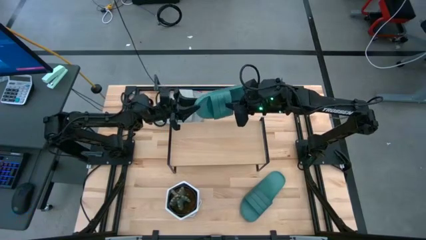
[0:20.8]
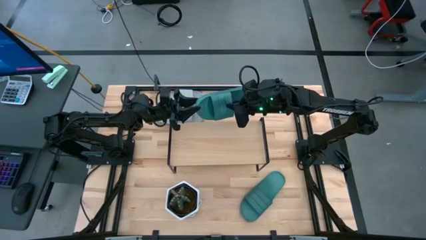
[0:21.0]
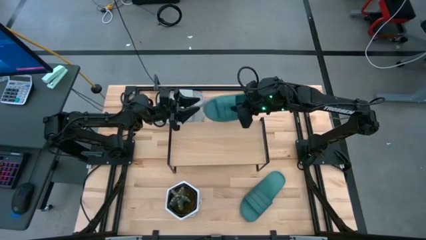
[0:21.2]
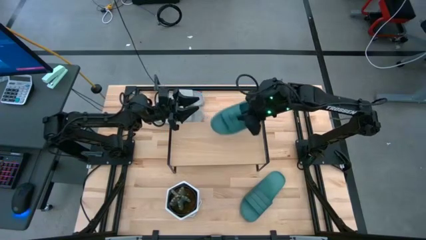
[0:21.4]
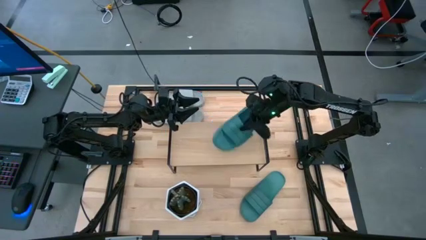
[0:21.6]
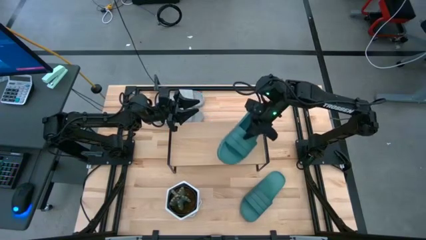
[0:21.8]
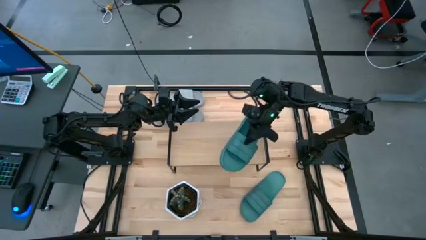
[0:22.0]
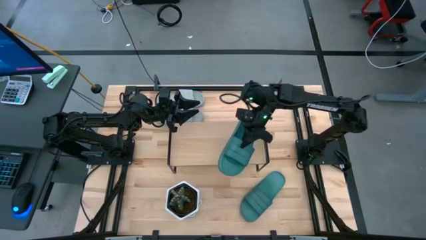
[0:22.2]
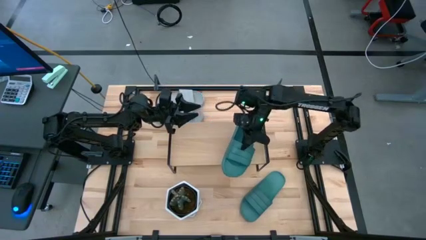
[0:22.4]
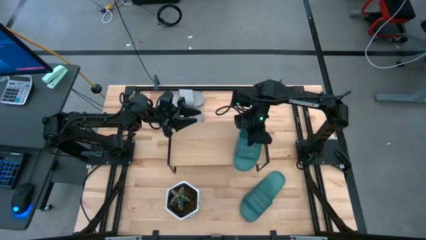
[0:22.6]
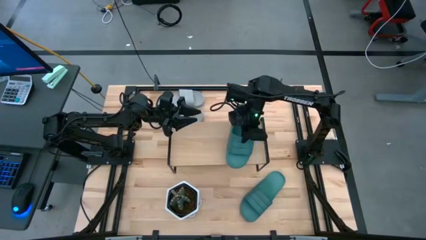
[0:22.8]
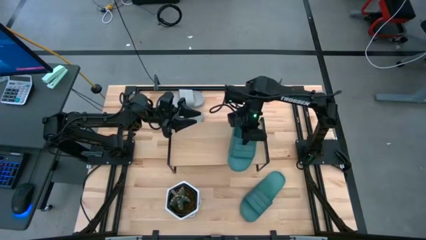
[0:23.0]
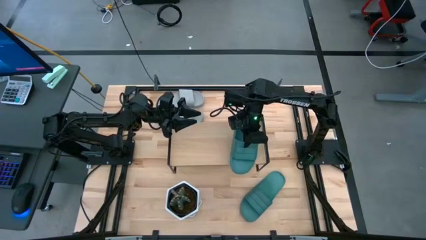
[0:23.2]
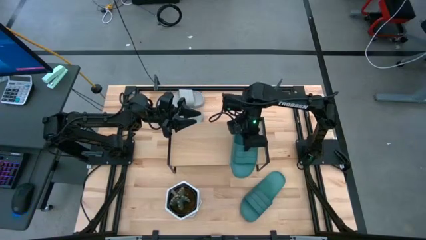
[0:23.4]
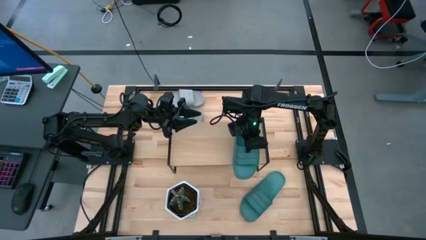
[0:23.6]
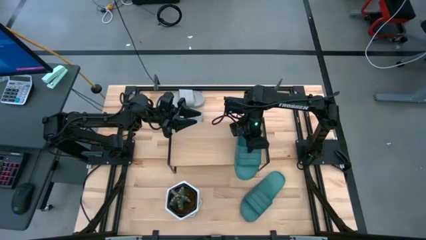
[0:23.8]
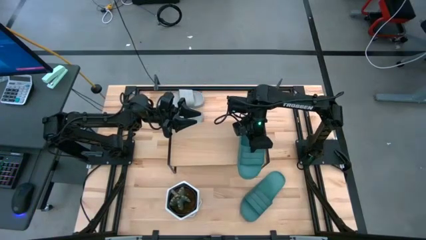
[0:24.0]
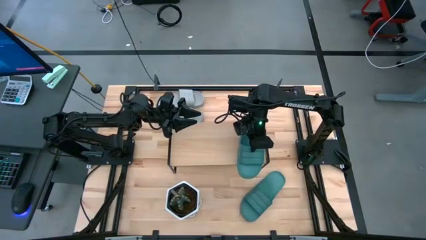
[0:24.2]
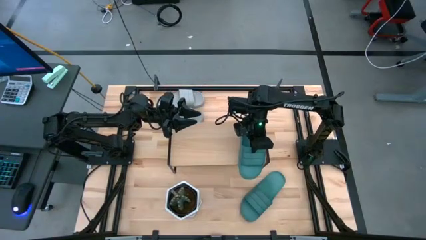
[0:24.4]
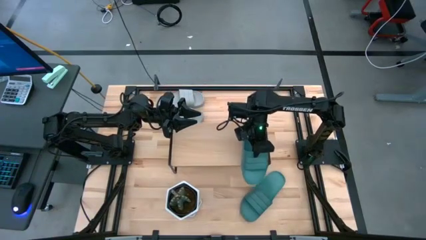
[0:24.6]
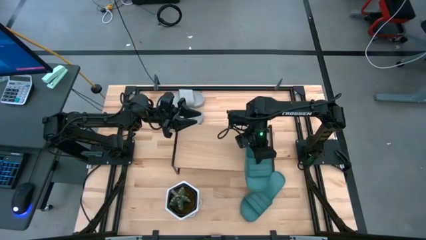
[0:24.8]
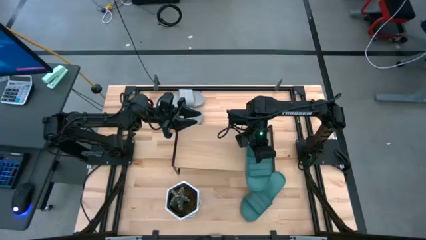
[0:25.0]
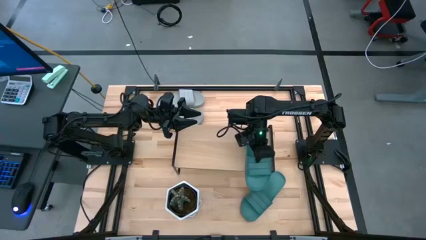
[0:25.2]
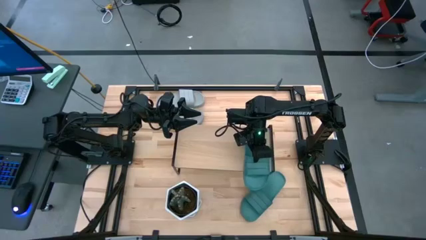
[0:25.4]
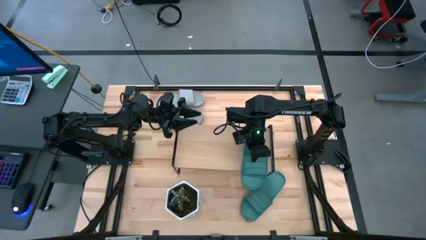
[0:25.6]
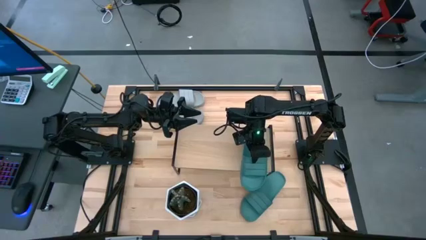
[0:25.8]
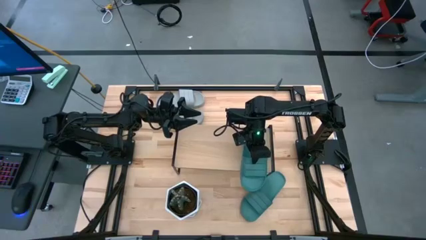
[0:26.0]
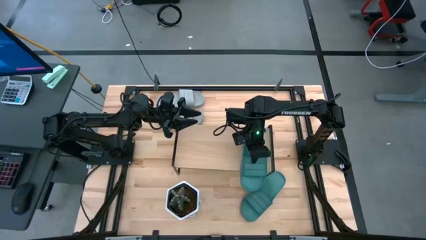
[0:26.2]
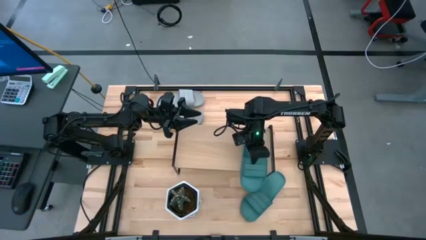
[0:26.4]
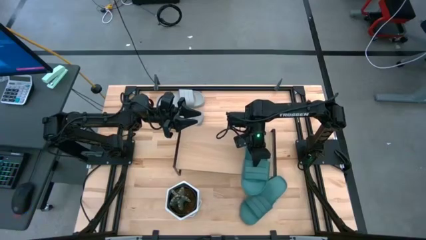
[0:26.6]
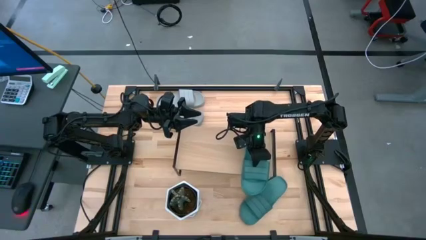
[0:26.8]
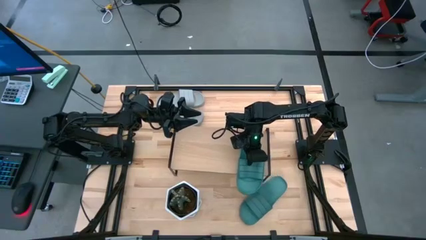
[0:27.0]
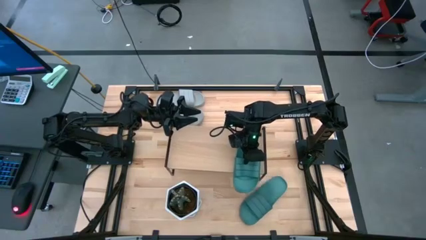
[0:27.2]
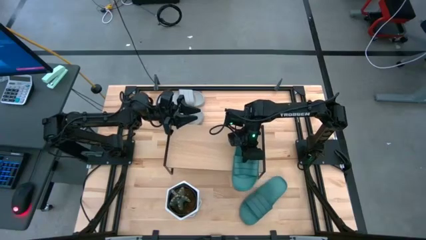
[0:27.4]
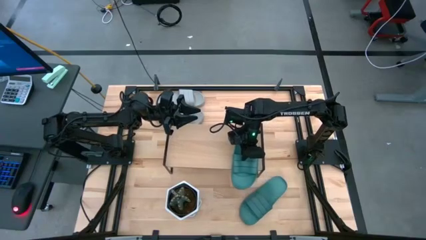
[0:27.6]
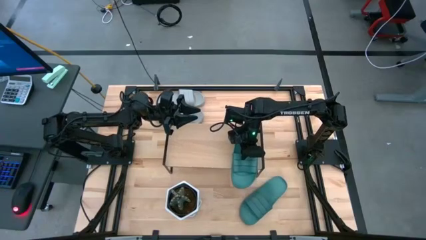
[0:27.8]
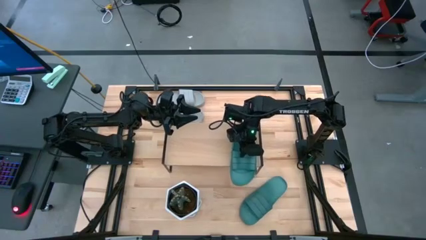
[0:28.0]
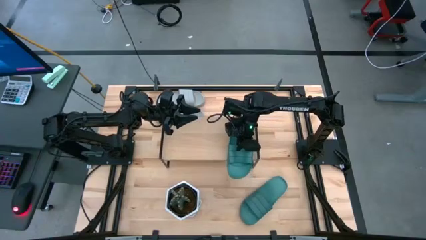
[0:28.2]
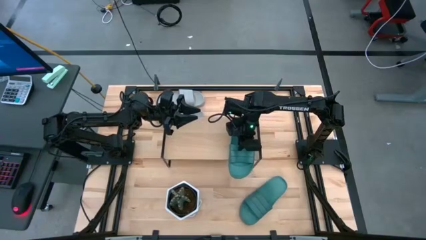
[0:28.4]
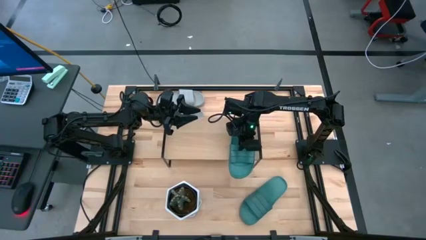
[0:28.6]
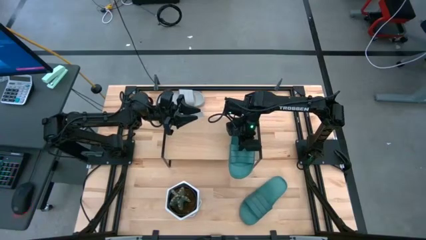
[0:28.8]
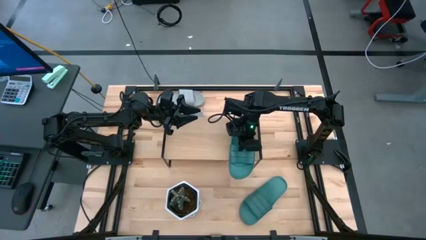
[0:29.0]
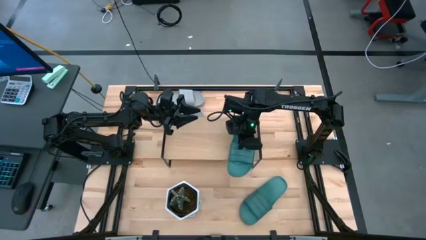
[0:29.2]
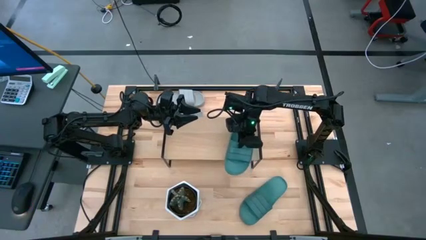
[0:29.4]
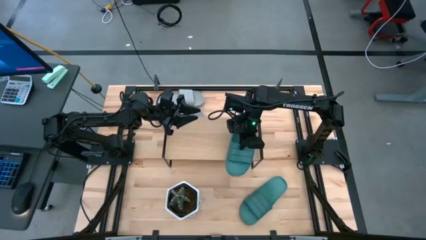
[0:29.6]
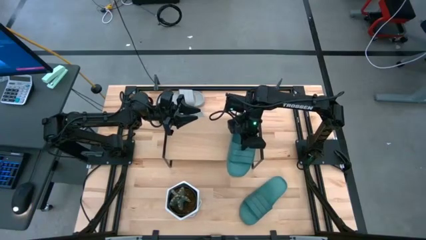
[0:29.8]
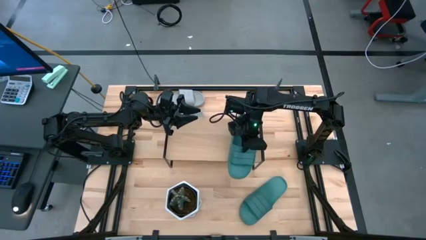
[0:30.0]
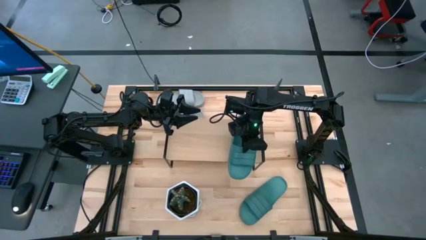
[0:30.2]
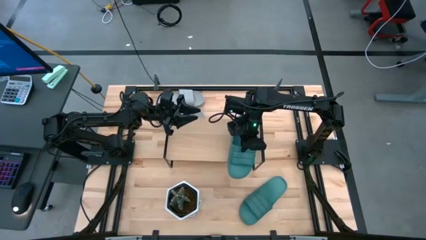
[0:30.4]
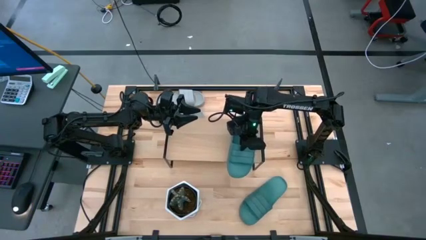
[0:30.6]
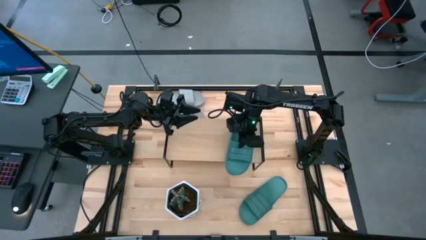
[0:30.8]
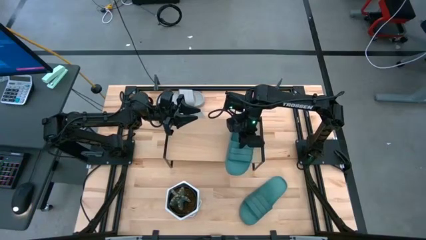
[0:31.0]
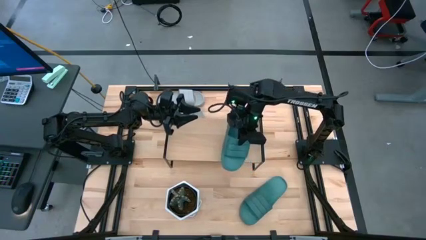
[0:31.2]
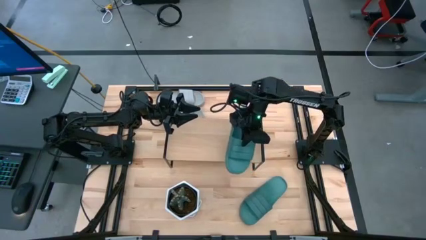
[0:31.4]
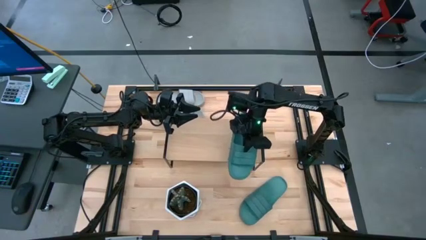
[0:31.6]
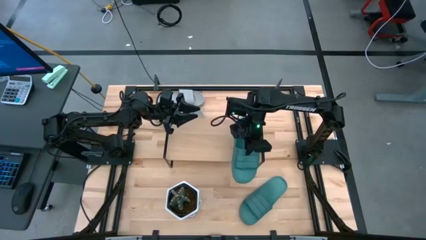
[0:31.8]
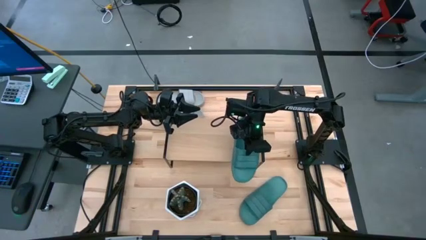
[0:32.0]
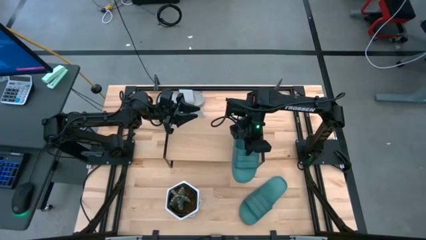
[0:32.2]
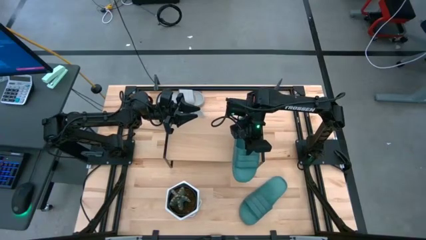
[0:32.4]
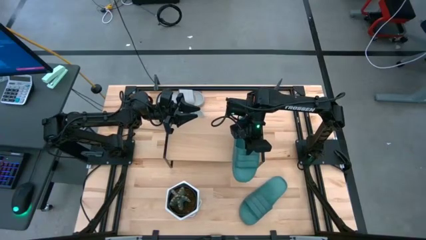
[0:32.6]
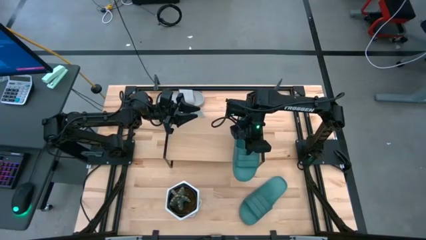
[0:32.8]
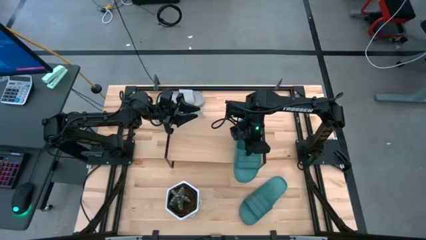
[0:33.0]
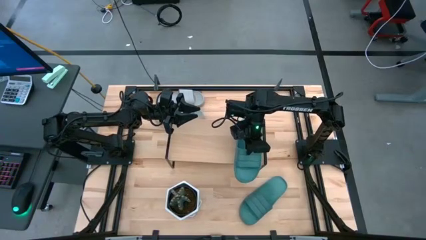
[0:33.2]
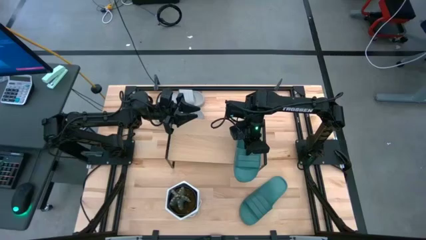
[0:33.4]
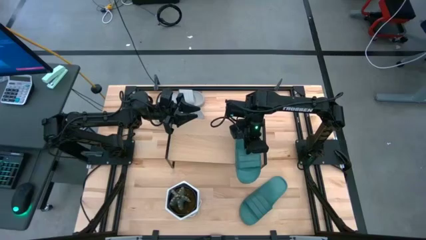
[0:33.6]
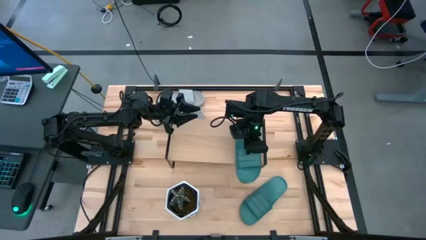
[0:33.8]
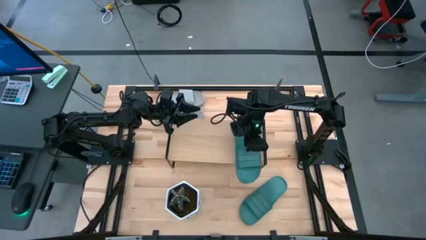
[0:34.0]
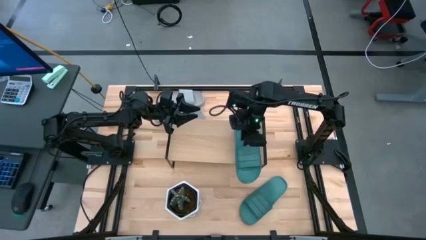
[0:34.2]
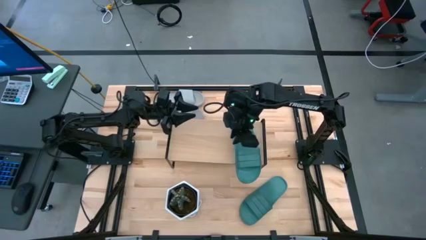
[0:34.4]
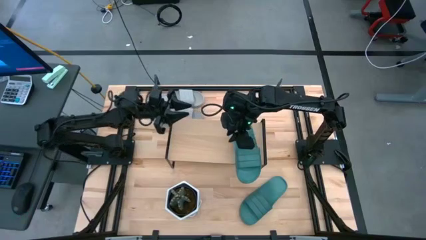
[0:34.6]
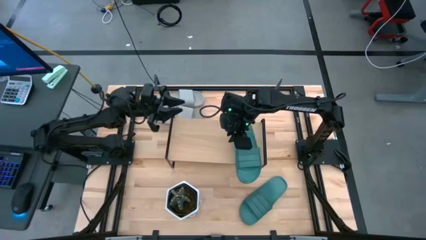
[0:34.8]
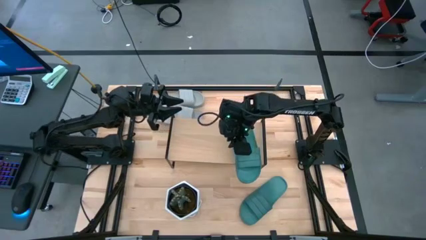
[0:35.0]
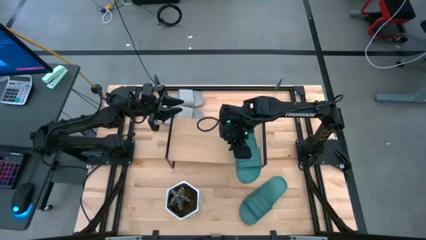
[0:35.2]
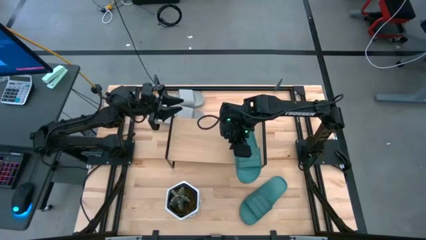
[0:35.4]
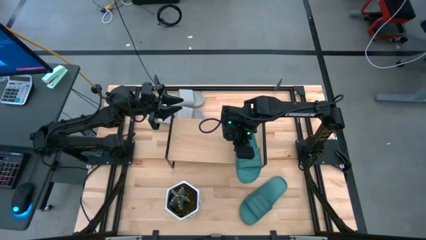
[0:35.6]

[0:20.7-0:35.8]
Task: Pick and place slides into the shelf
Put the right green slide on the shelf

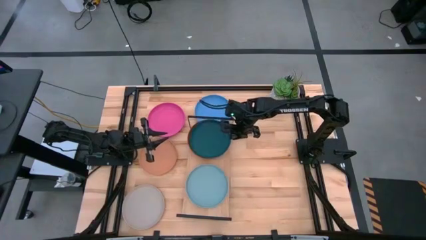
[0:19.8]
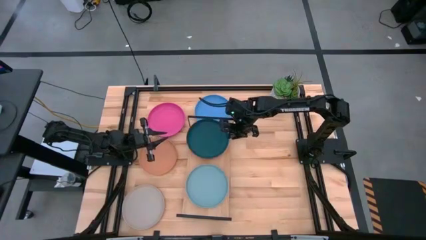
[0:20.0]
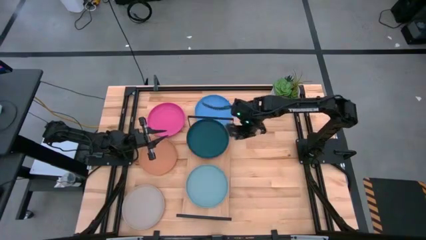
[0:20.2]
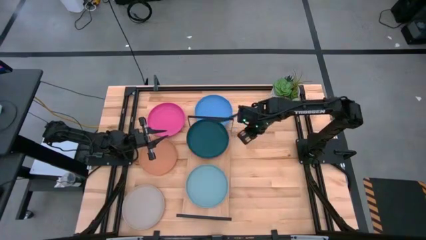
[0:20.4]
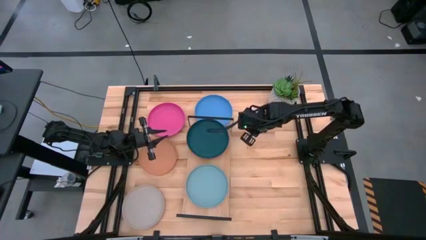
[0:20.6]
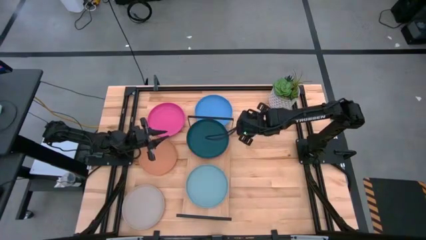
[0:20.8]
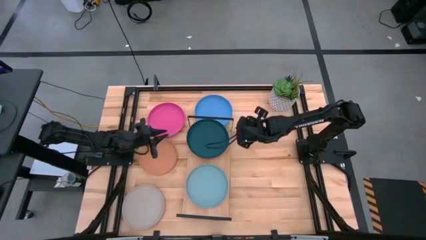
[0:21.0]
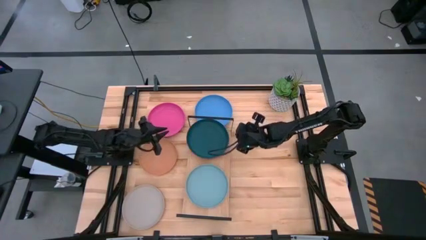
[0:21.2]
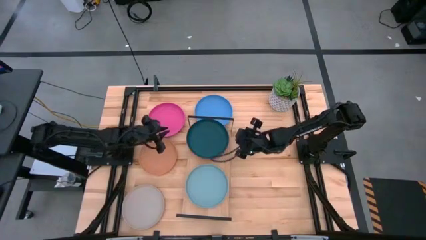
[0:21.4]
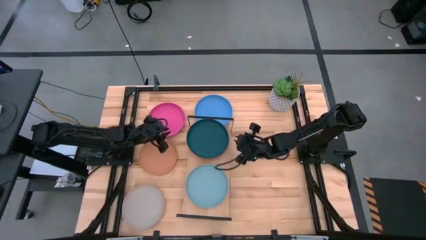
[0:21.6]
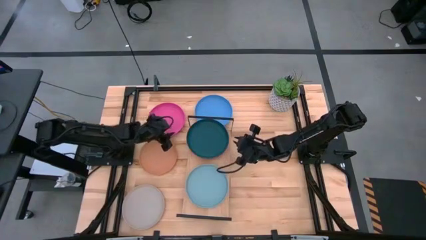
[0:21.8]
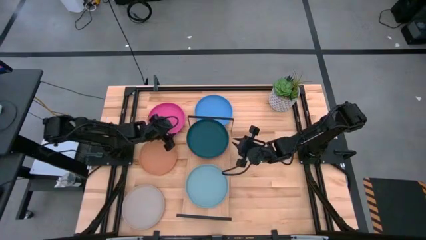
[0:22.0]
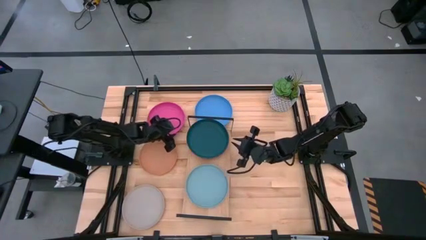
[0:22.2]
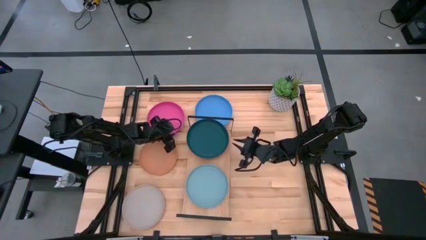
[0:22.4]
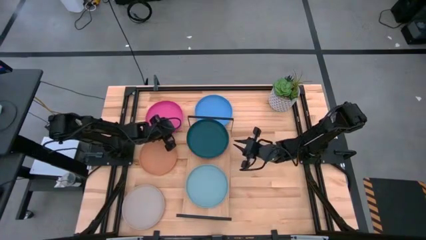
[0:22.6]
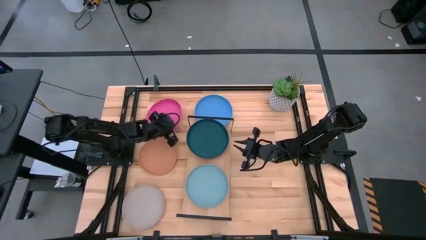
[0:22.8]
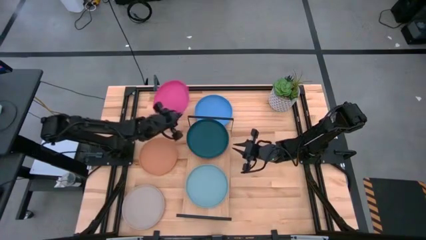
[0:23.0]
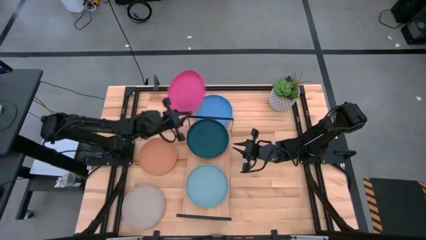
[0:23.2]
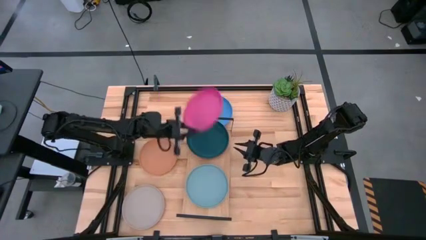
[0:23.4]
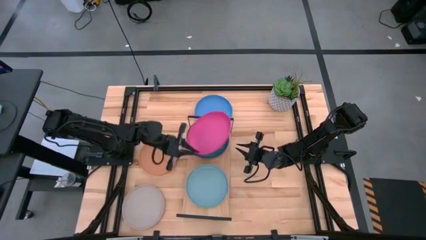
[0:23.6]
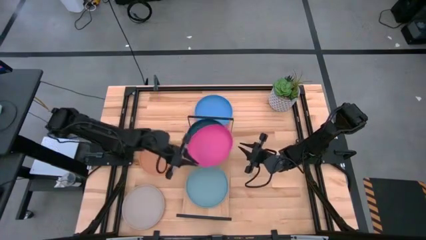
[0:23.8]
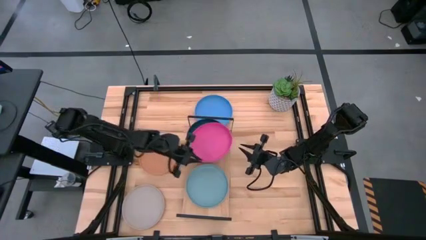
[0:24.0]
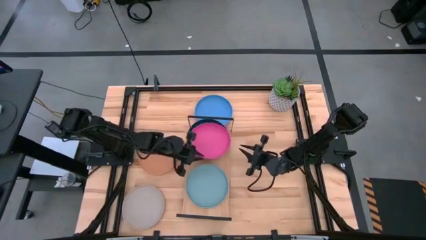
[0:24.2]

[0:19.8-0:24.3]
Task: Place and stack plates onto a shelf
Stack the pink plate on top of the dark green plate on the shelf
